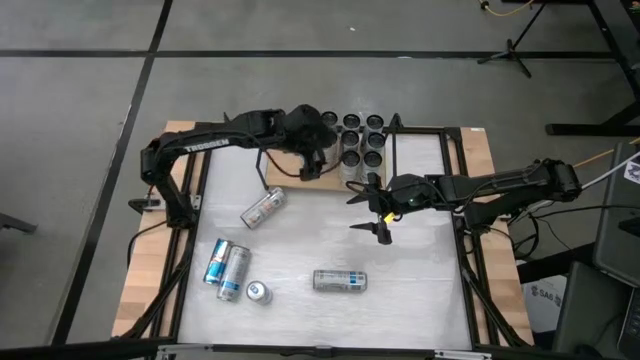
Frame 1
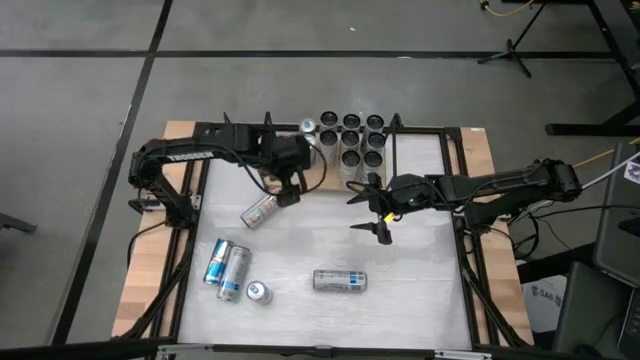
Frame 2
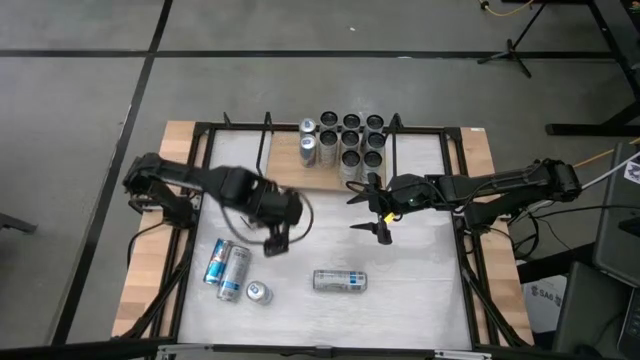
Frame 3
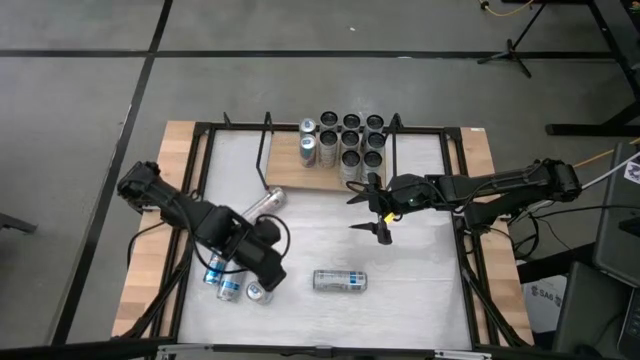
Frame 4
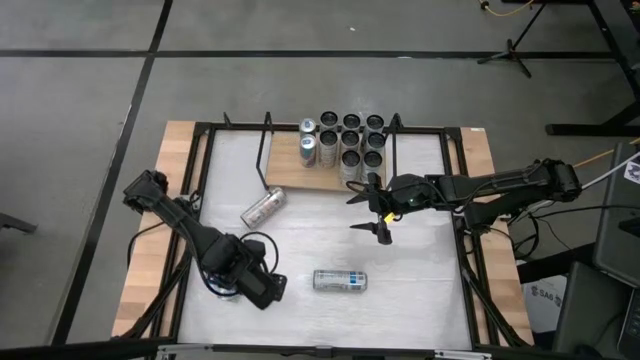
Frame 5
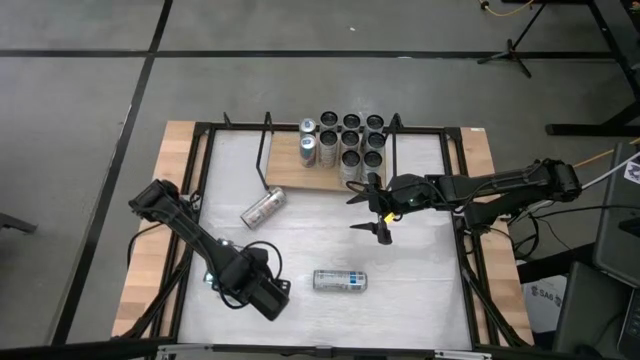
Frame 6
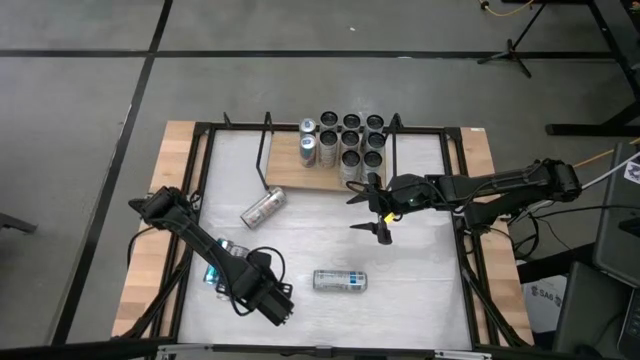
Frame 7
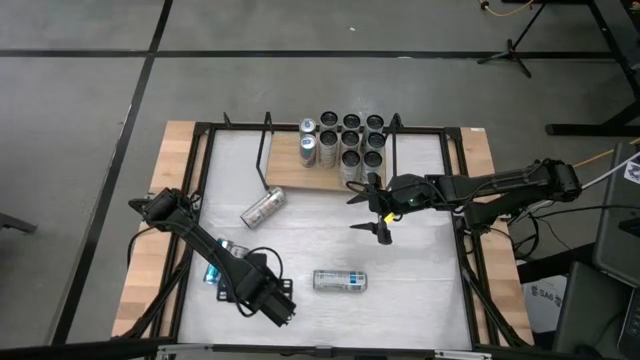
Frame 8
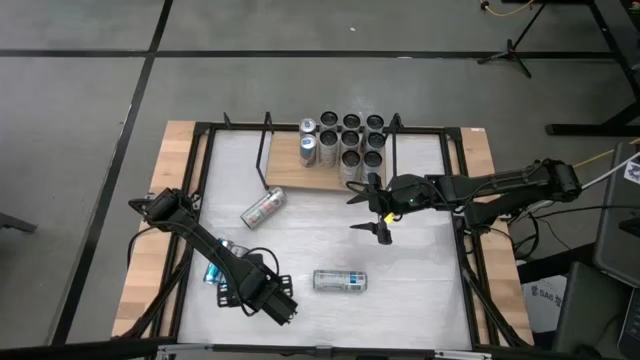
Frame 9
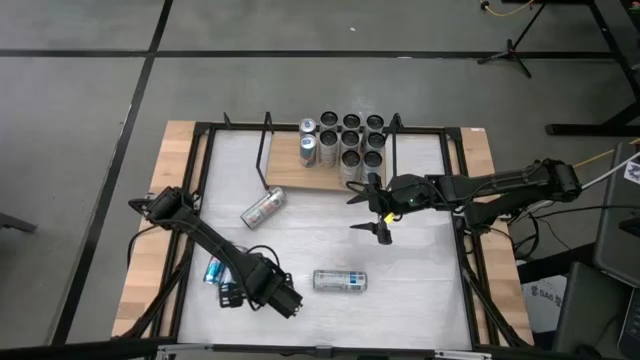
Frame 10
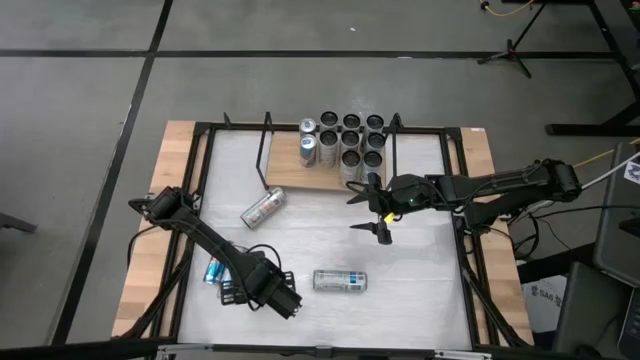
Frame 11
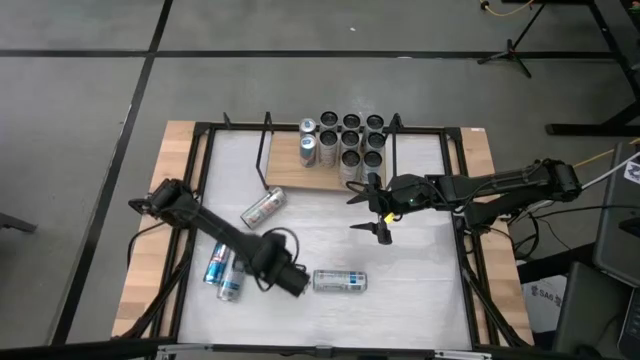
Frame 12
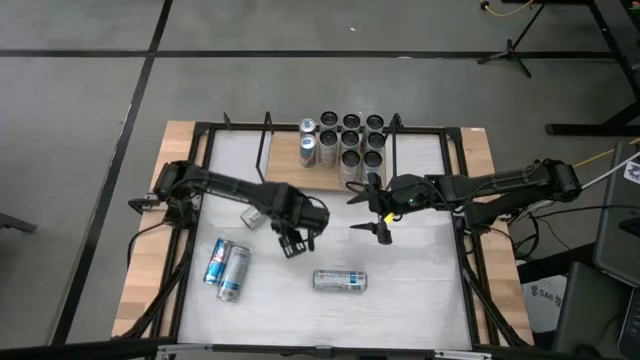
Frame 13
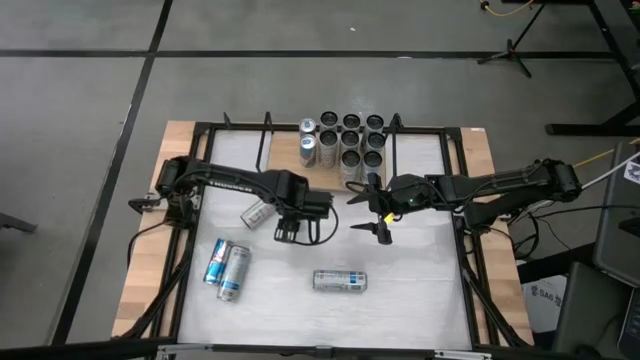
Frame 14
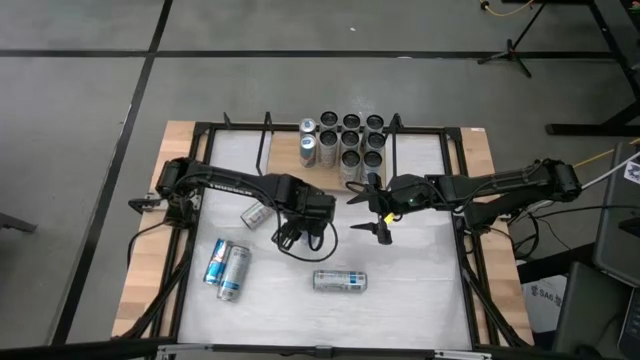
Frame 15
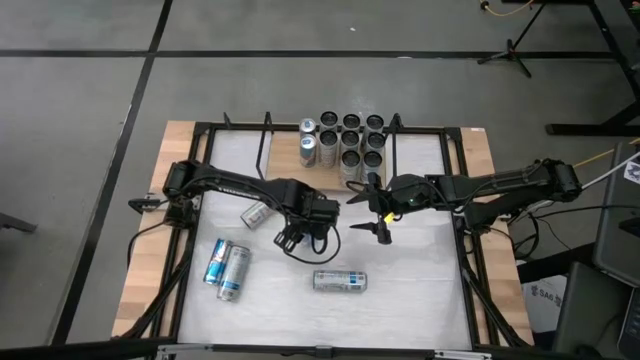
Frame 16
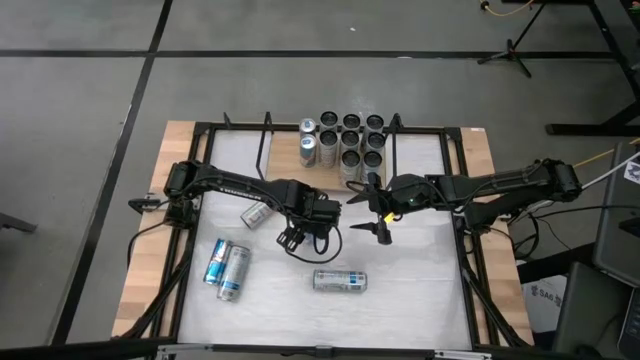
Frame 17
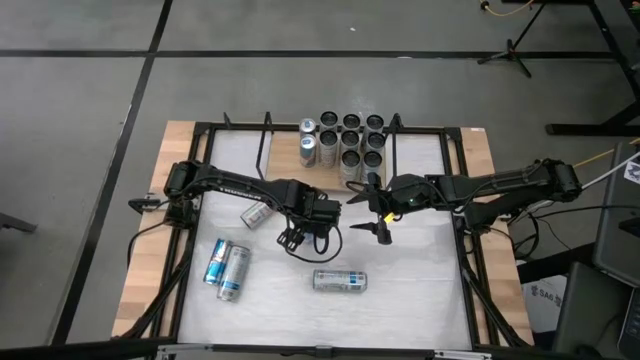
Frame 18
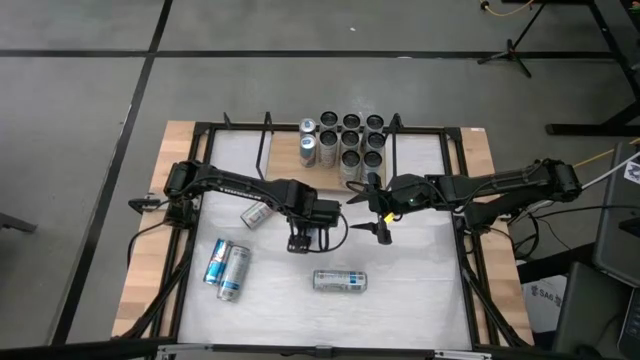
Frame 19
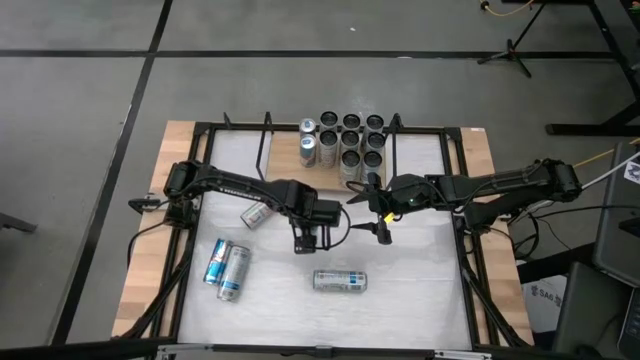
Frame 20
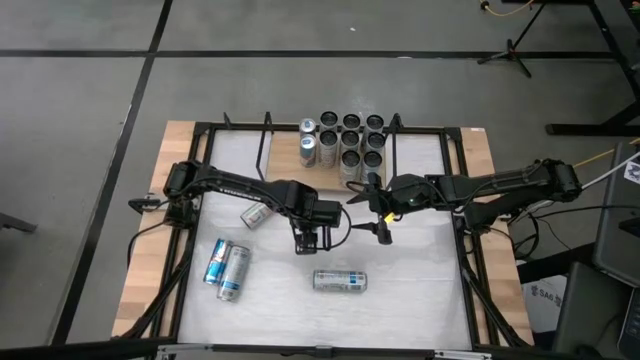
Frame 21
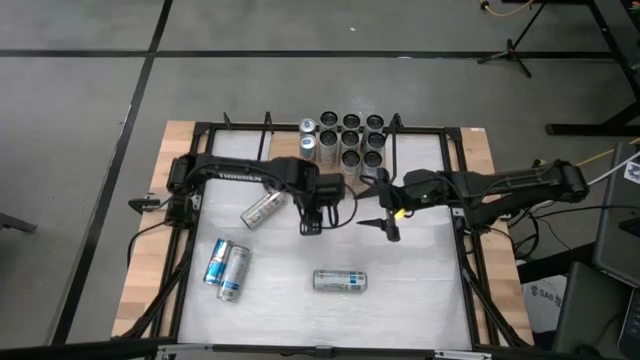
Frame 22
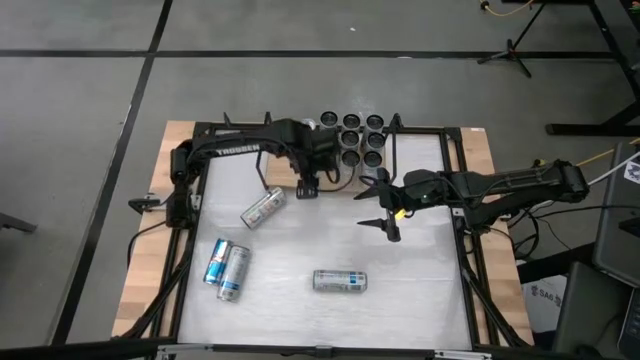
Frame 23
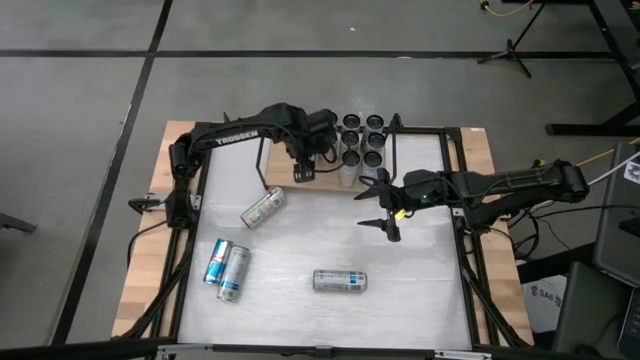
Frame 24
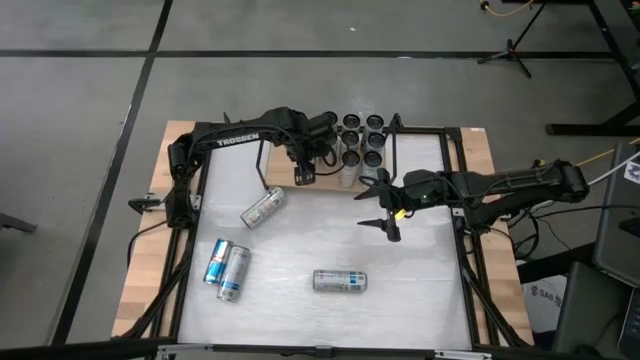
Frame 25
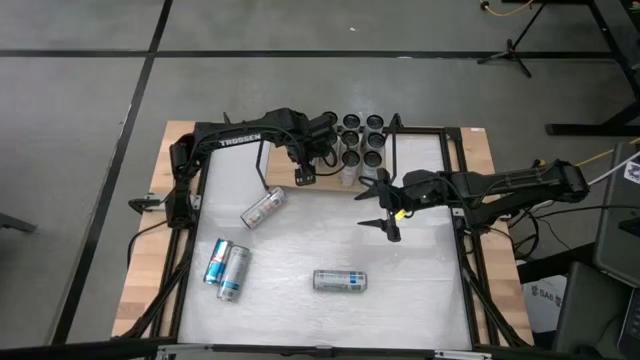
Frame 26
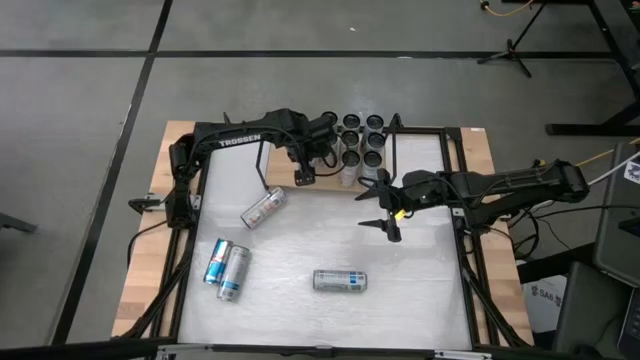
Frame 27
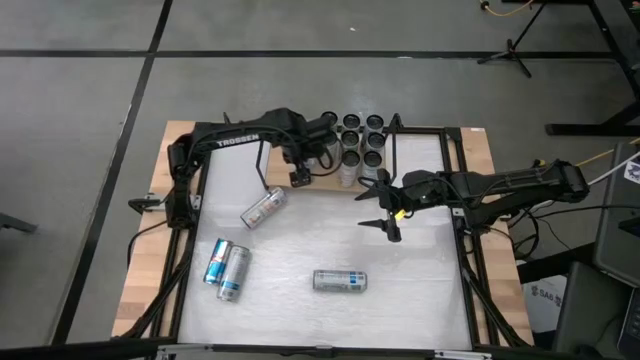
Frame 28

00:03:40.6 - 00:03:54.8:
Task: Place canned beverage on shelf
Put the blue soda can aligned with the other blue soda can on the shelf

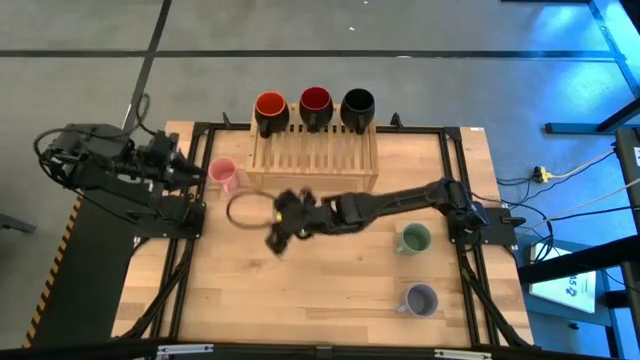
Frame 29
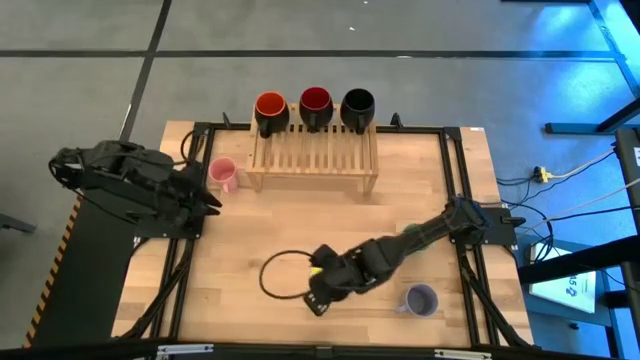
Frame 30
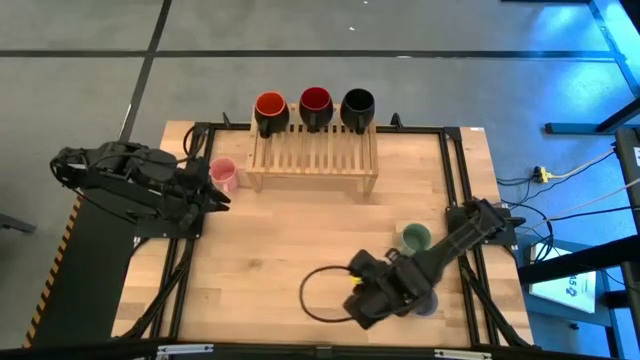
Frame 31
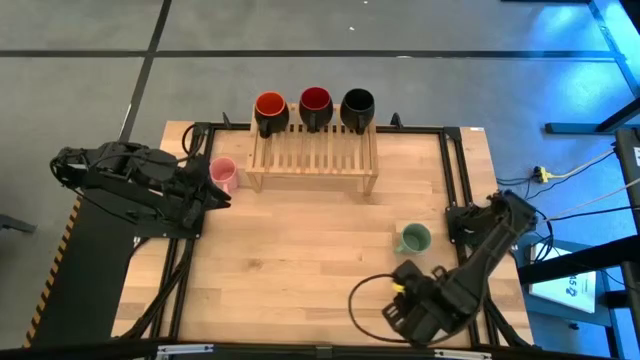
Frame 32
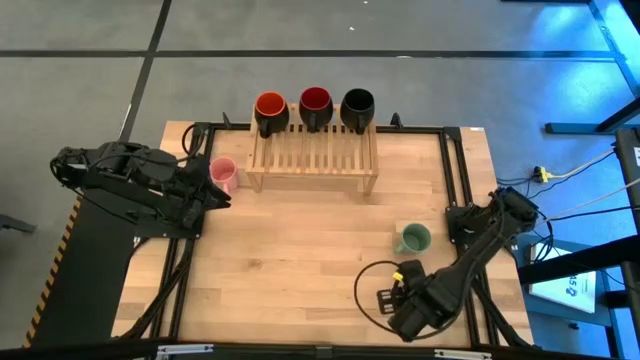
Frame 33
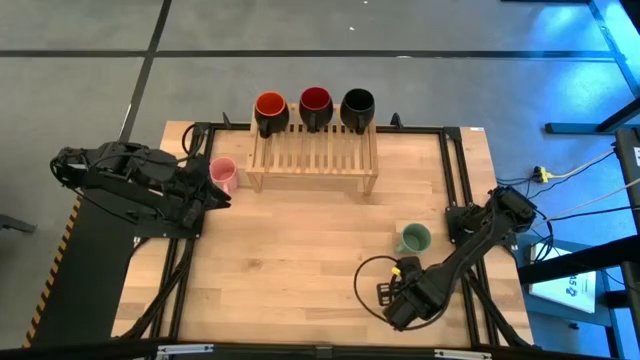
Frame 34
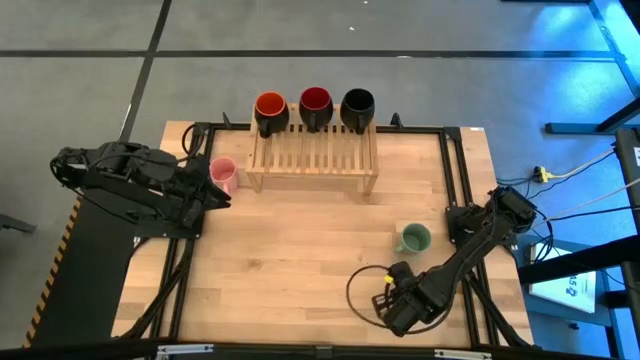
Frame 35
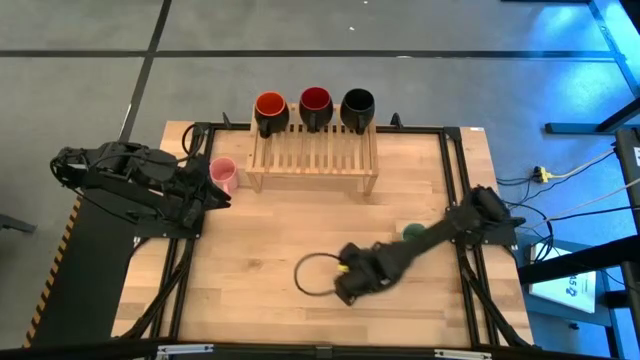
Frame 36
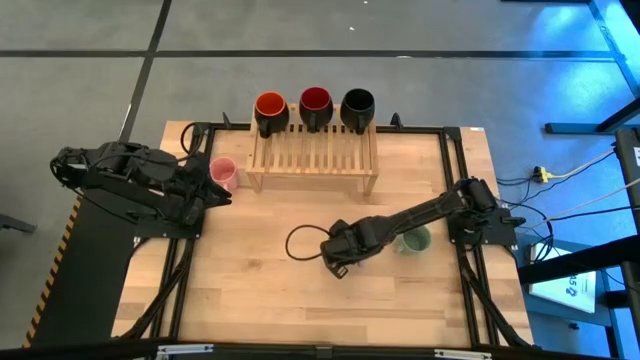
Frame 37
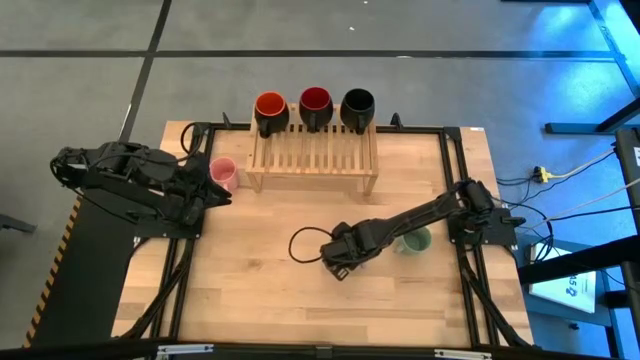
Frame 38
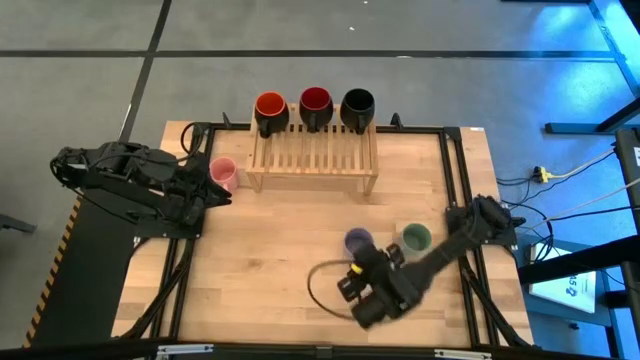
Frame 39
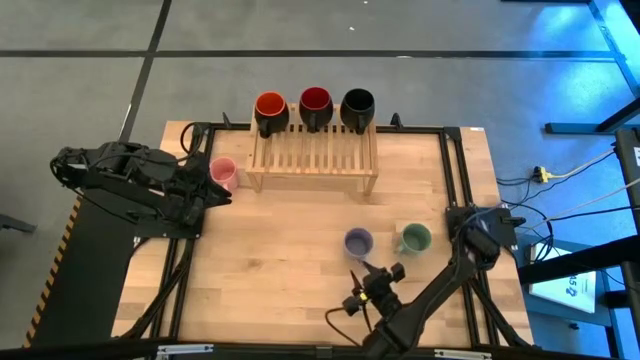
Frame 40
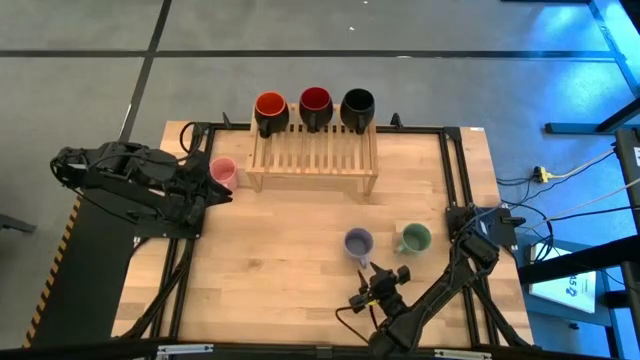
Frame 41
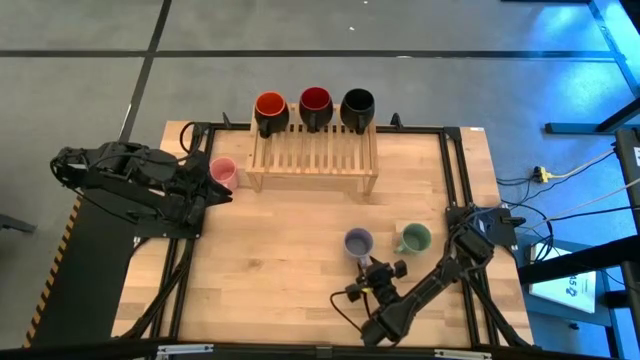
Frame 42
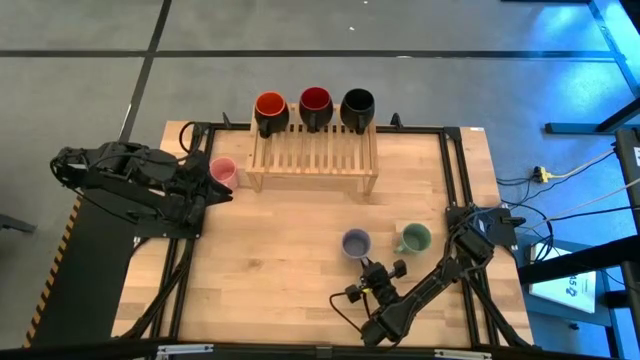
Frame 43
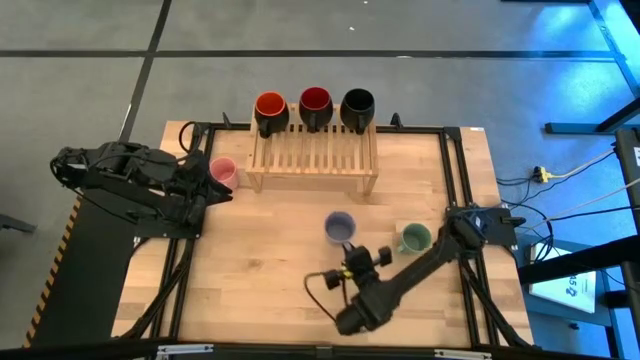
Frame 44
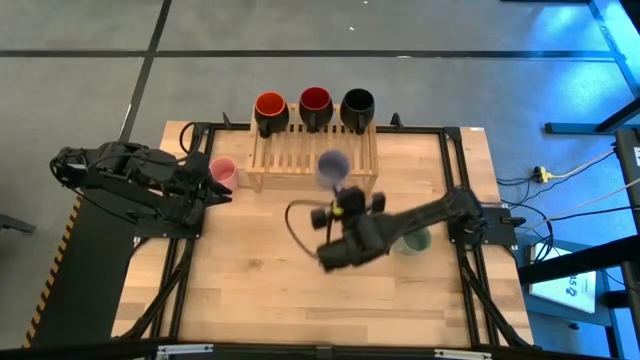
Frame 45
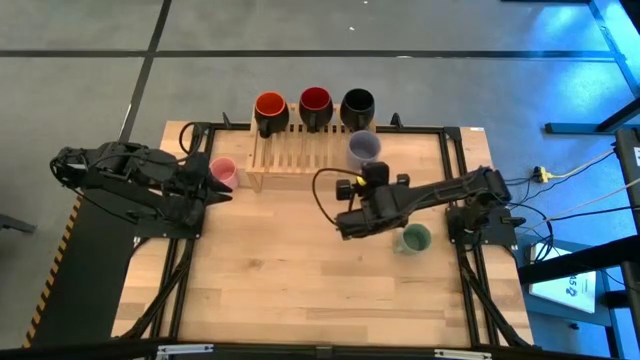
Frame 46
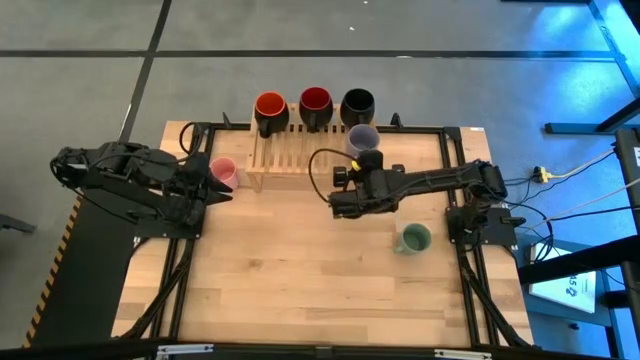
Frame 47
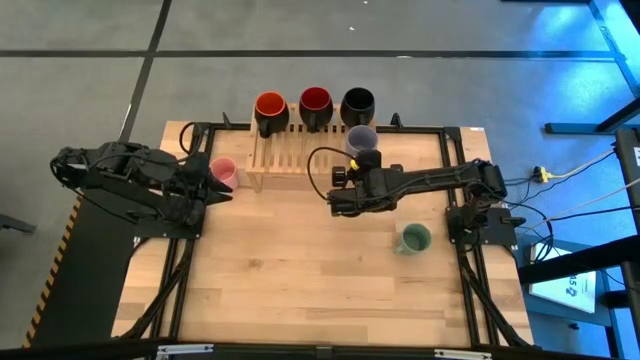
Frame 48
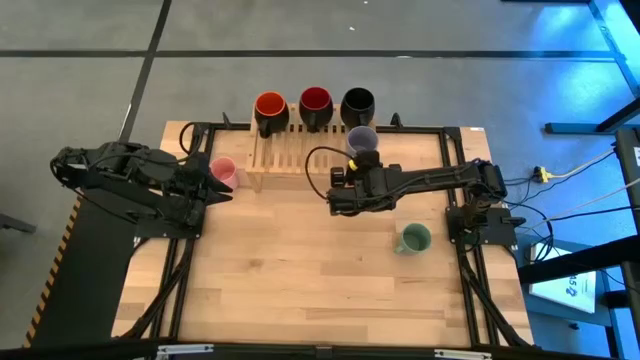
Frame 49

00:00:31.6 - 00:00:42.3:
Task: Place coffee mugs
Put the blue mug on the shelf
